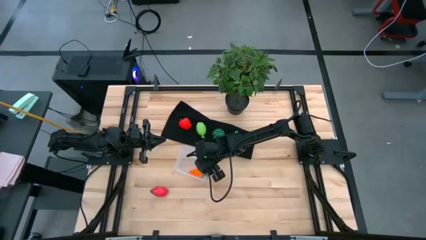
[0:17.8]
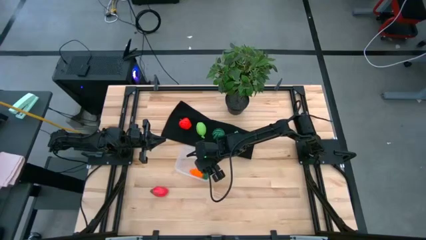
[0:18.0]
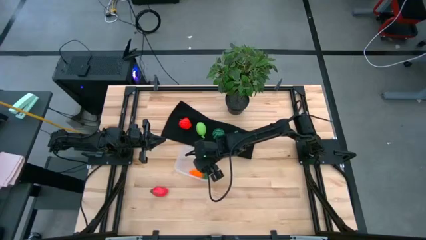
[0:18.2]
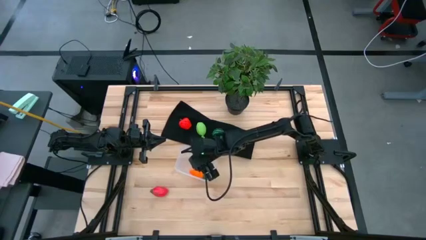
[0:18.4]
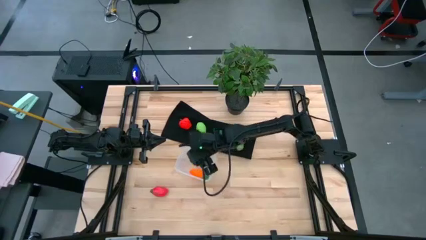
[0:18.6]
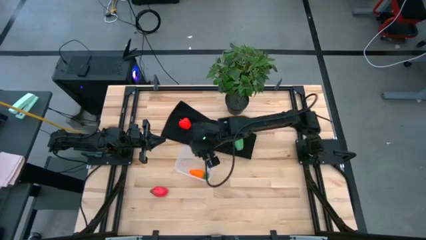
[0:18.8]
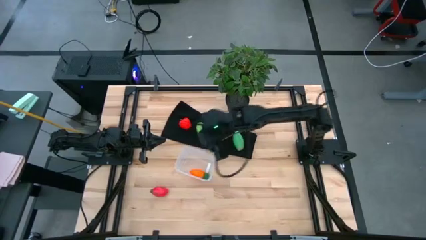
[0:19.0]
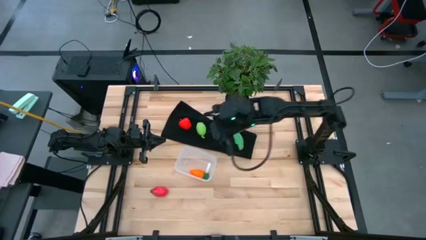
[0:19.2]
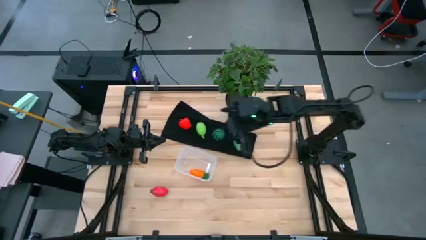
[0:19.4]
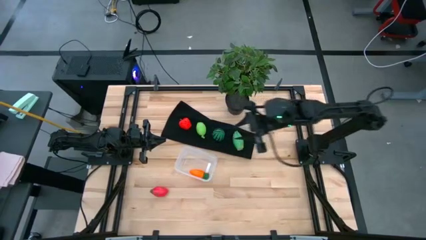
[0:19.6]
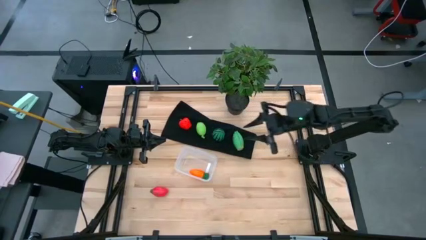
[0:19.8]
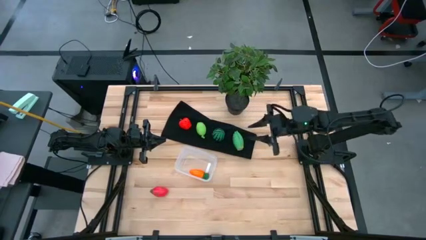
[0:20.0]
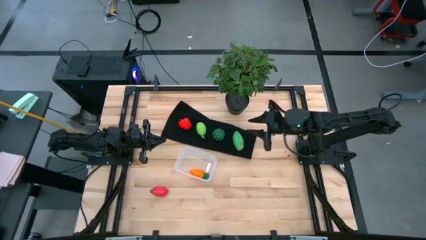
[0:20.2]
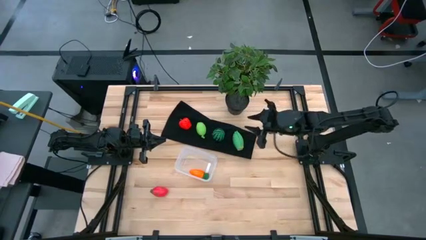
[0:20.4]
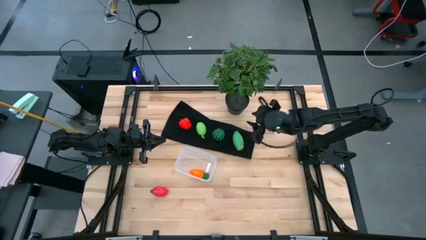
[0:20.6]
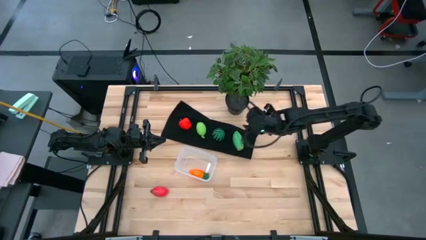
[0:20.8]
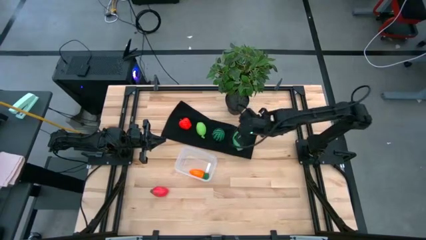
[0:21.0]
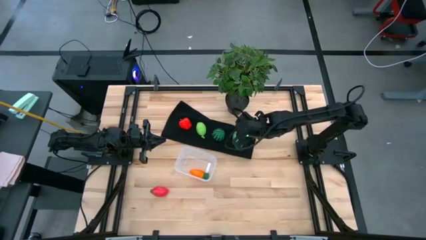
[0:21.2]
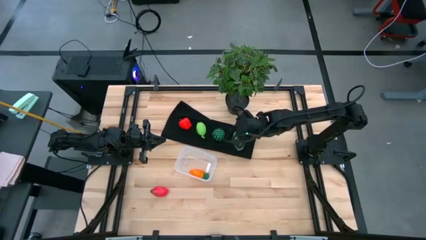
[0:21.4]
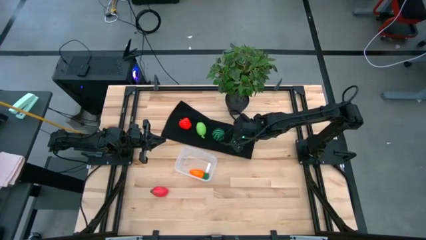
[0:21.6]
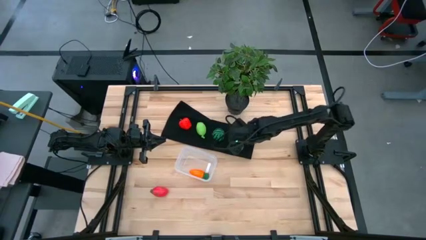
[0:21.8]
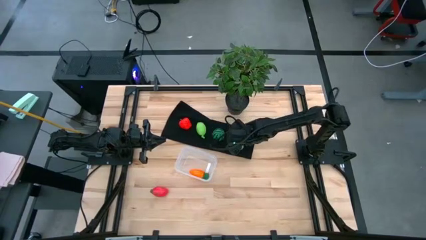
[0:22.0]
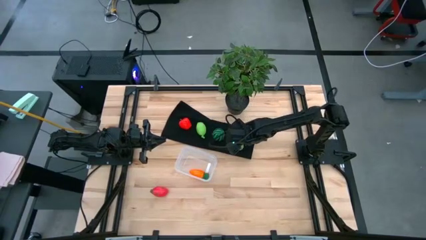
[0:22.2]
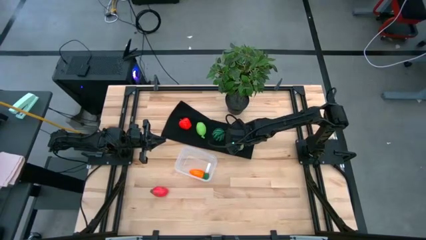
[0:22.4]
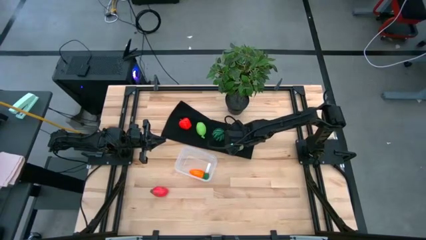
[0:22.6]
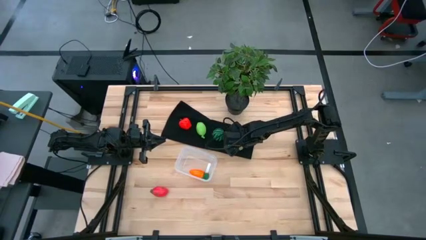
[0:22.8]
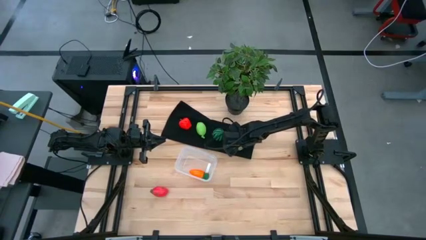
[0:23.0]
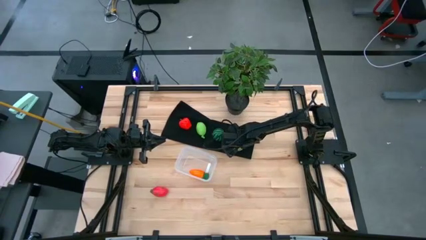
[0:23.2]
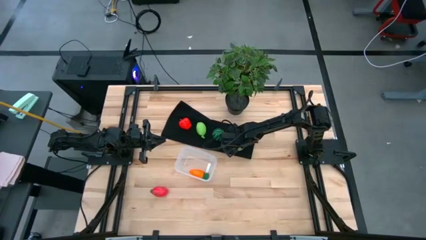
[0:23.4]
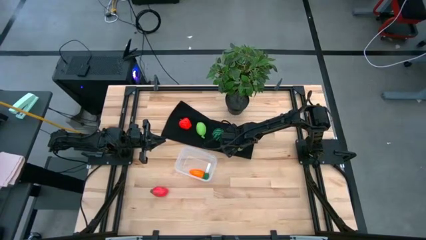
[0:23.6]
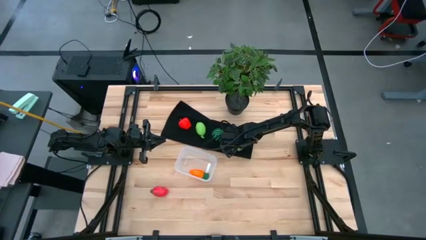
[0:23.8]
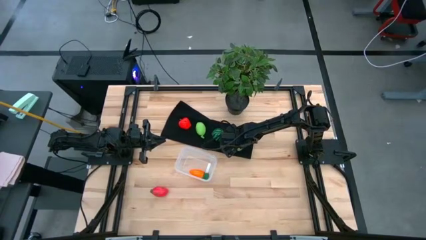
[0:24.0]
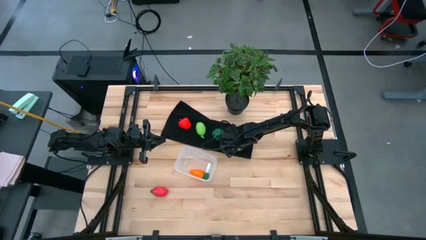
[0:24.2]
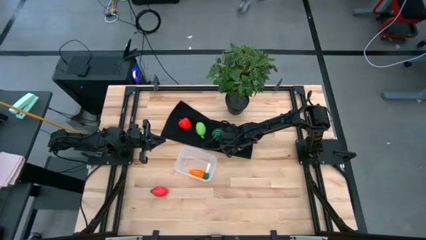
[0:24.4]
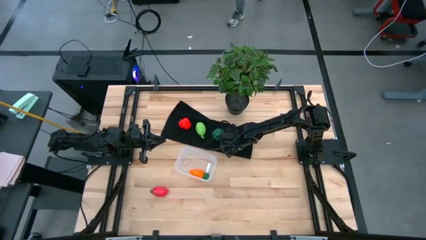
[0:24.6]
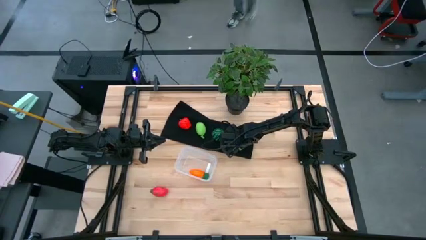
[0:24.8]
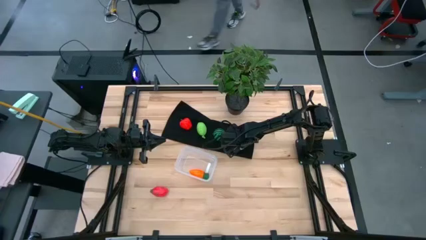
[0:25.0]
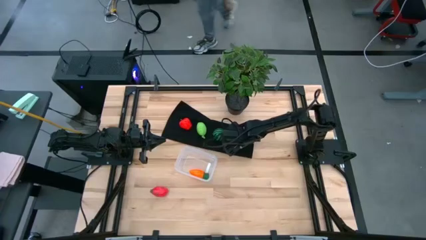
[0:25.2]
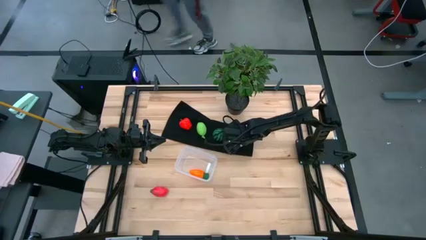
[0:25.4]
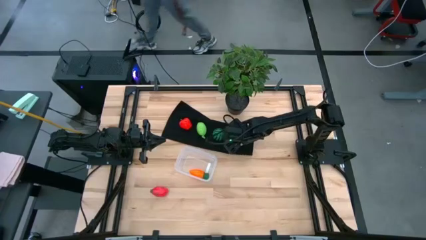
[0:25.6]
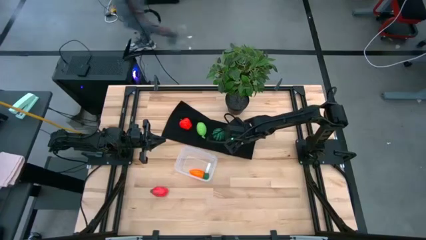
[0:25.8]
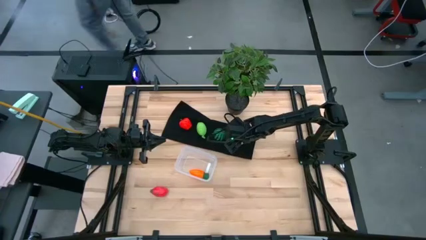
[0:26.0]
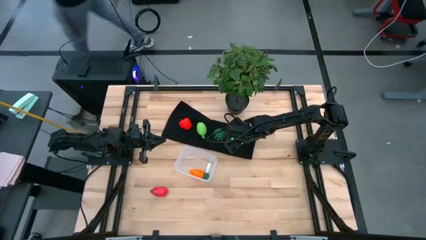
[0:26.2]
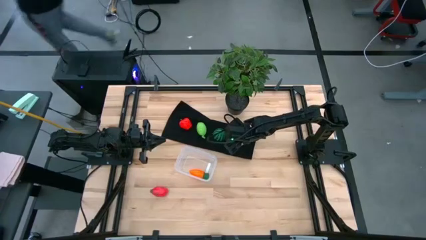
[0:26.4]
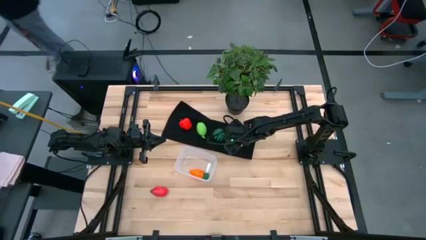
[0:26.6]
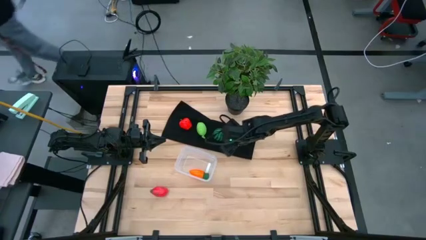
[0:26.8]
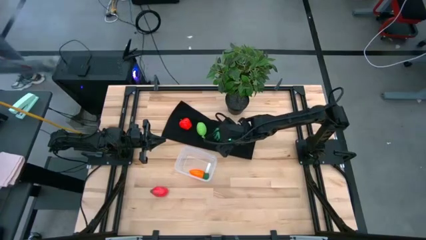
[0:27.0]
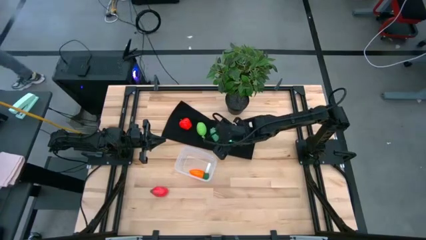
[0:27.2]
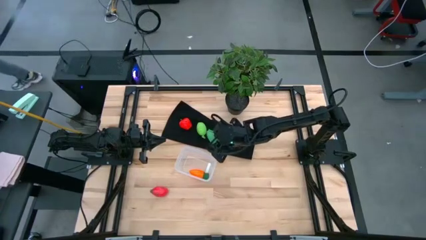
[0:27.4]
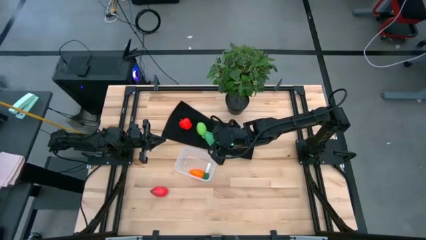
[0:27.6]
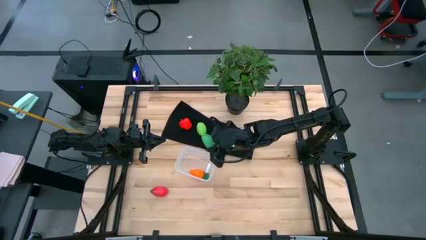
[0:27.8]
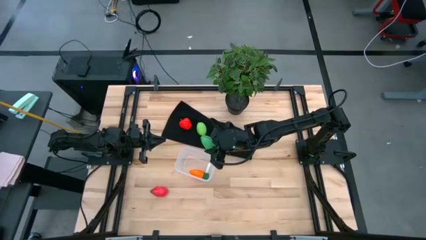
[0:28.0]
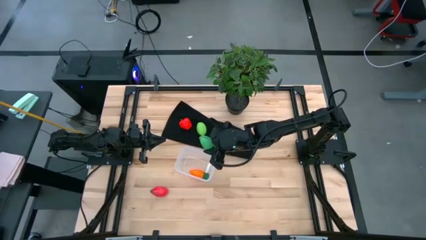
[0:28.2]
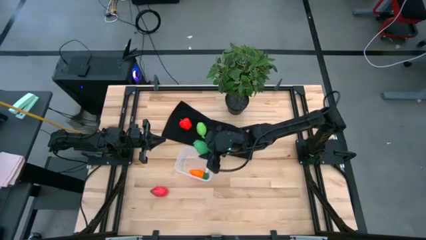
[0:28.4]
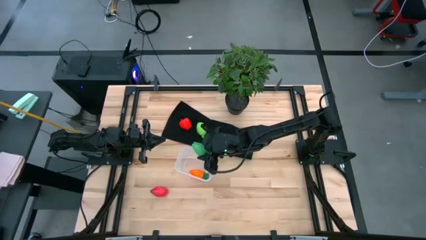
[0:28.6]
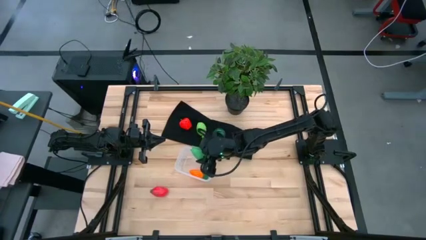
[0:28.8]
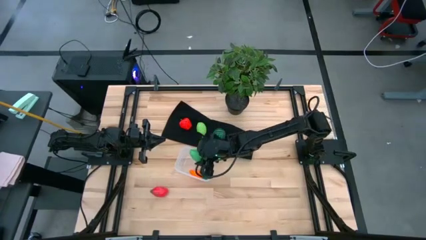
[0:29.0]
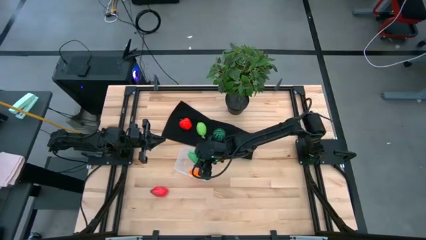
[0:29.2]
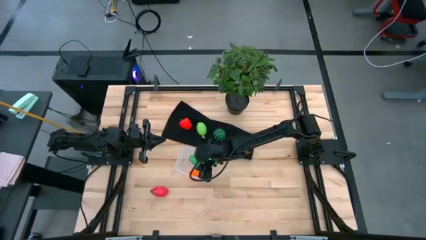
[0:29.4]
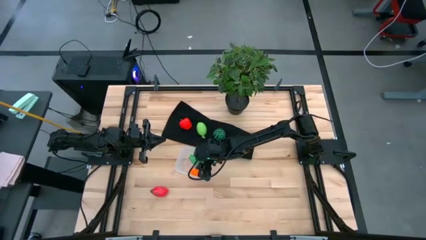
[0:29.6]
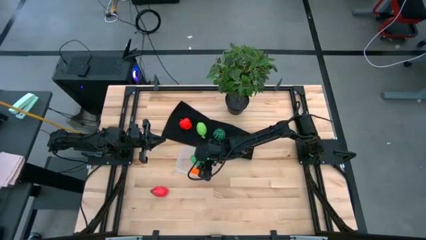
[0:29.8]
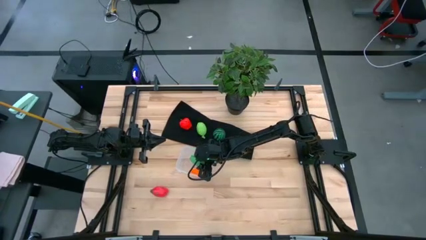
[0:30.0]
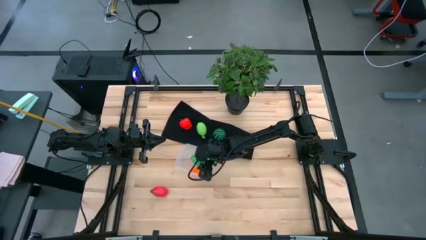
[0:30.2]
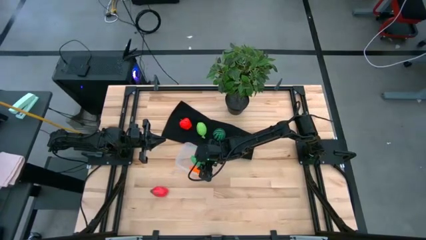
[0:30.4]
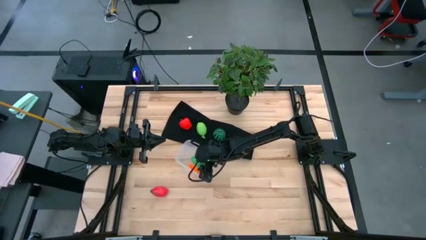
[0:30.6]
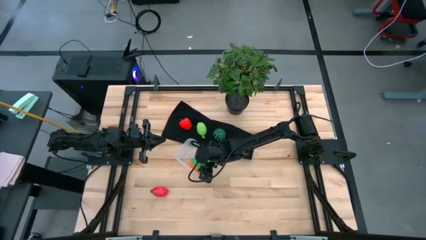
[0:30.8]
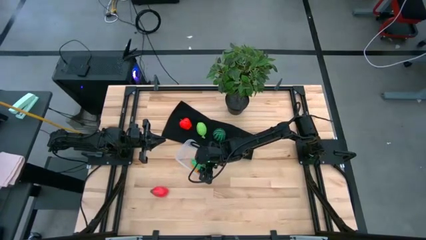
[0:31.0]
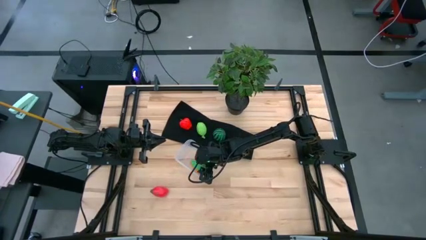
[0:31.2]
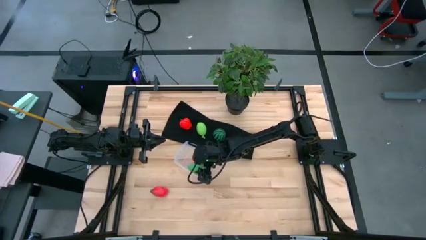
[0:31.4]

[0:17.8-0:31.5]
Task: Pick and placing Produce into tupperware
Put the green corn into the transparent bin
